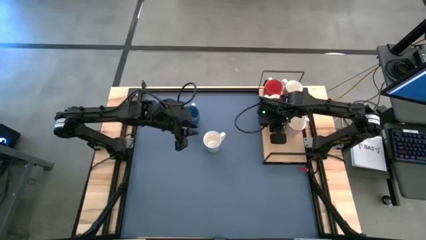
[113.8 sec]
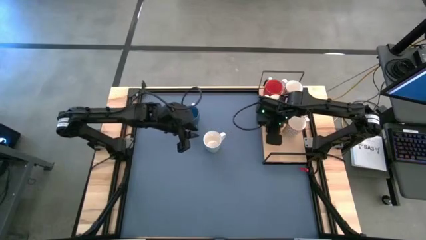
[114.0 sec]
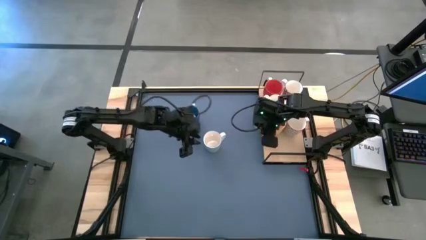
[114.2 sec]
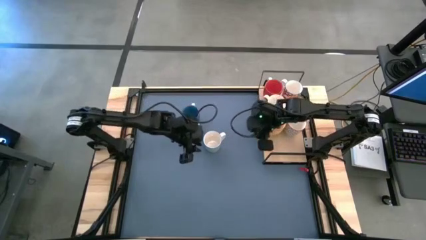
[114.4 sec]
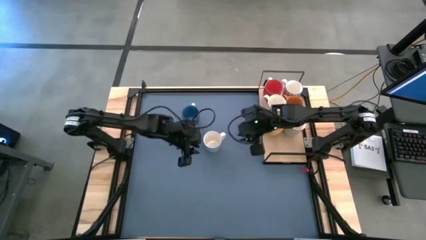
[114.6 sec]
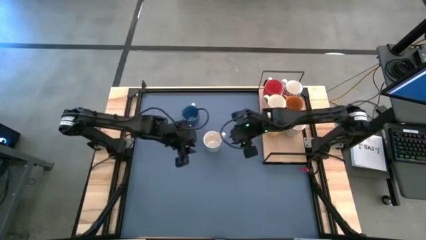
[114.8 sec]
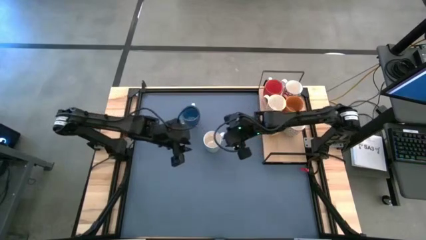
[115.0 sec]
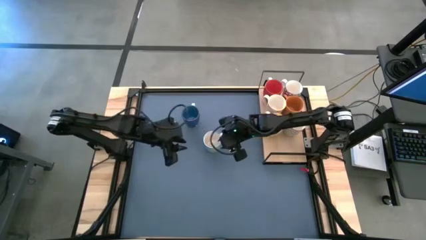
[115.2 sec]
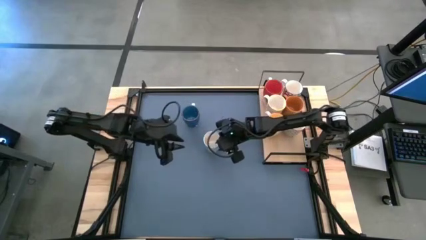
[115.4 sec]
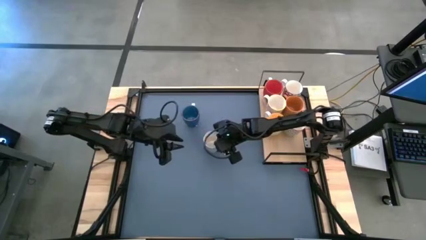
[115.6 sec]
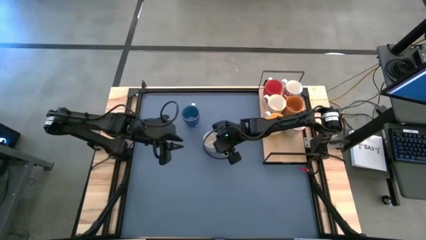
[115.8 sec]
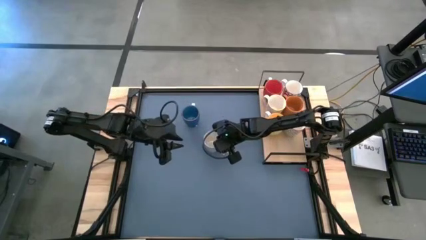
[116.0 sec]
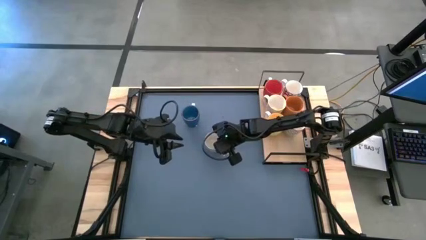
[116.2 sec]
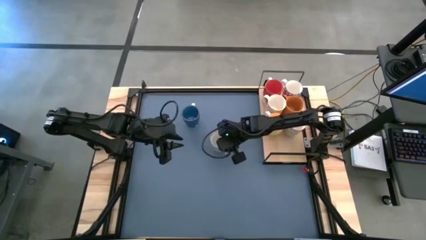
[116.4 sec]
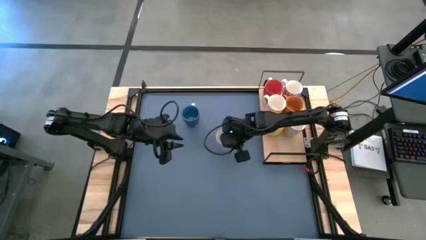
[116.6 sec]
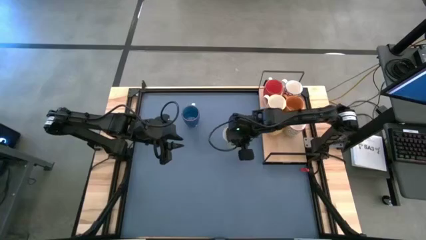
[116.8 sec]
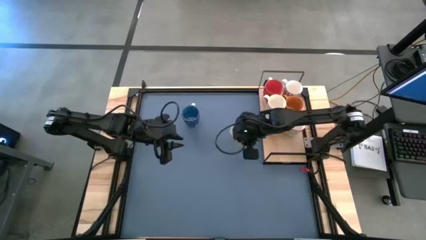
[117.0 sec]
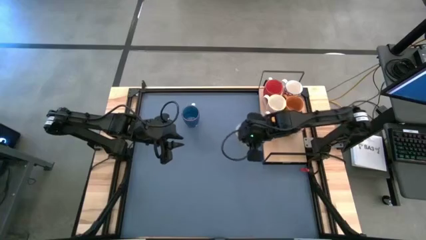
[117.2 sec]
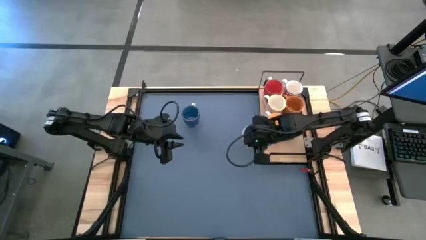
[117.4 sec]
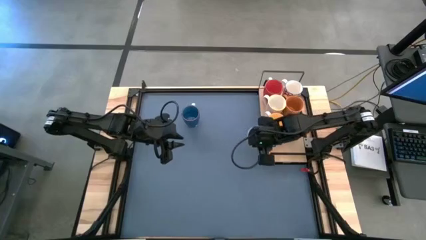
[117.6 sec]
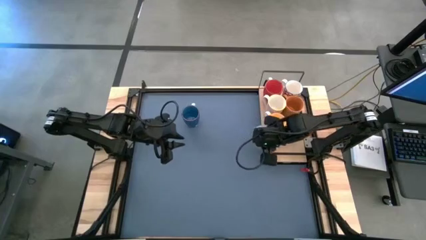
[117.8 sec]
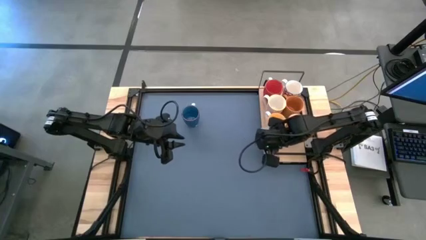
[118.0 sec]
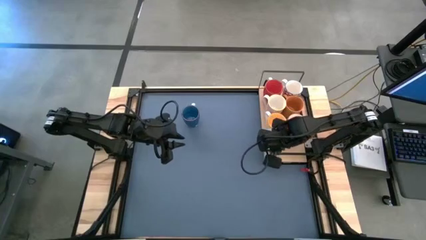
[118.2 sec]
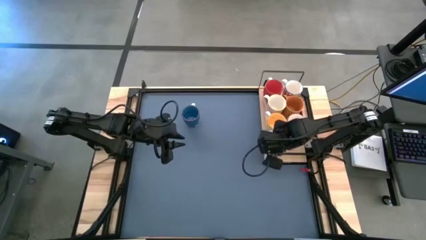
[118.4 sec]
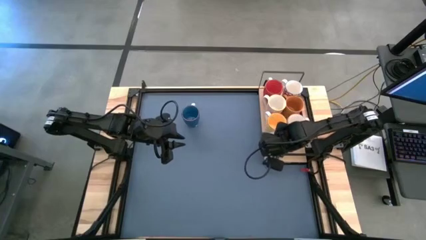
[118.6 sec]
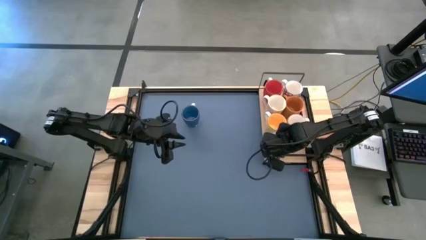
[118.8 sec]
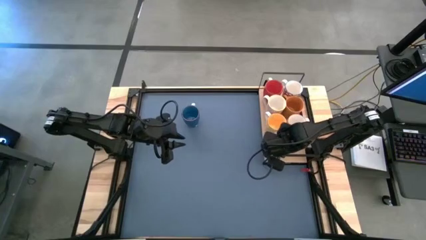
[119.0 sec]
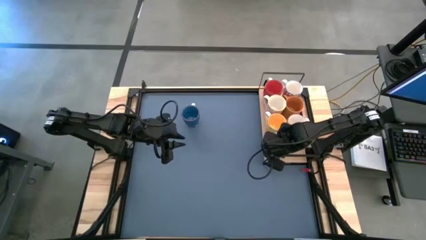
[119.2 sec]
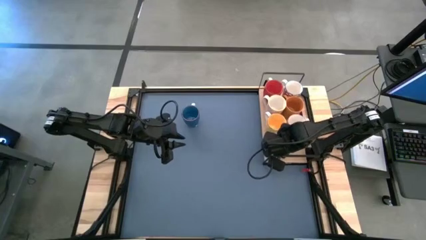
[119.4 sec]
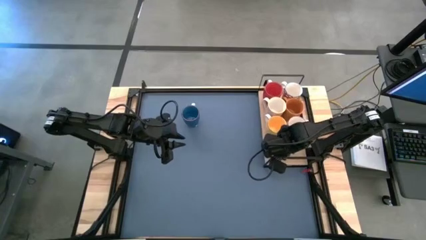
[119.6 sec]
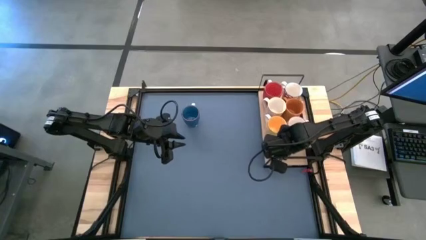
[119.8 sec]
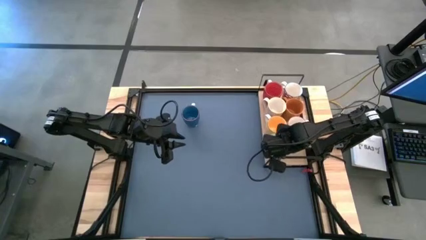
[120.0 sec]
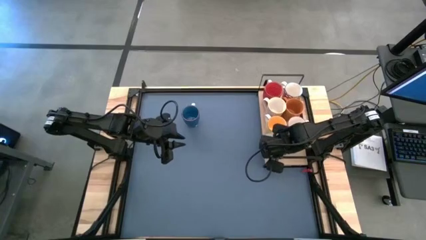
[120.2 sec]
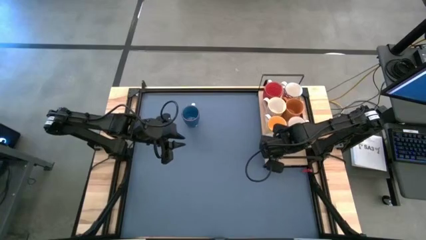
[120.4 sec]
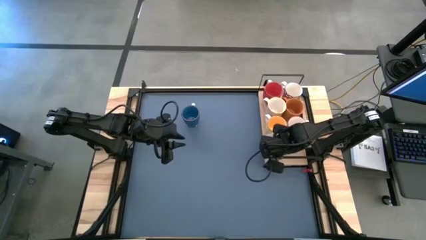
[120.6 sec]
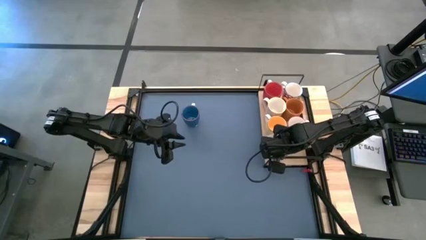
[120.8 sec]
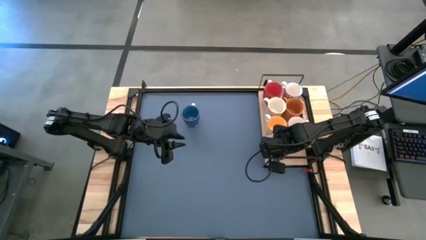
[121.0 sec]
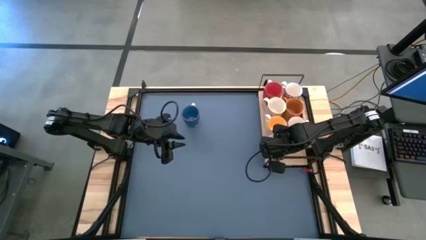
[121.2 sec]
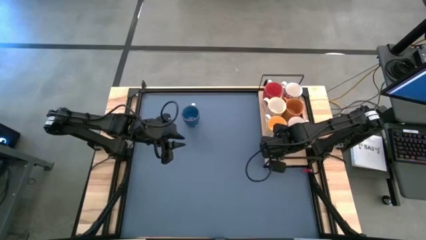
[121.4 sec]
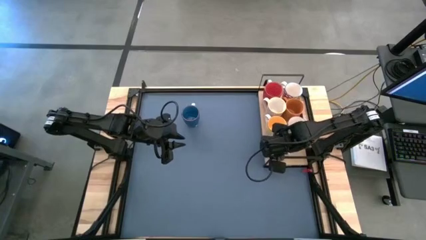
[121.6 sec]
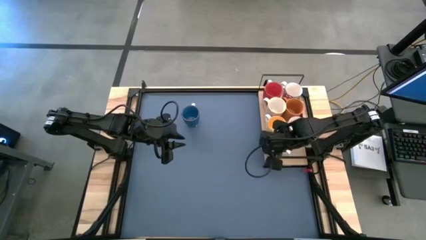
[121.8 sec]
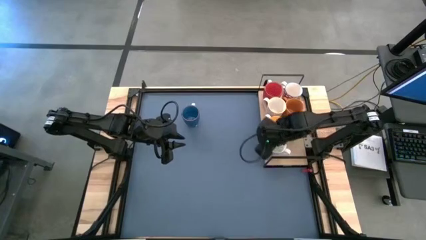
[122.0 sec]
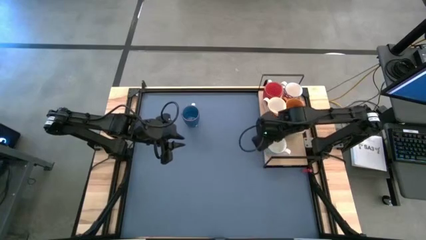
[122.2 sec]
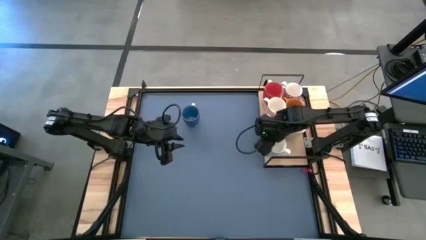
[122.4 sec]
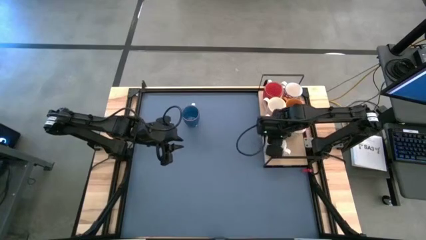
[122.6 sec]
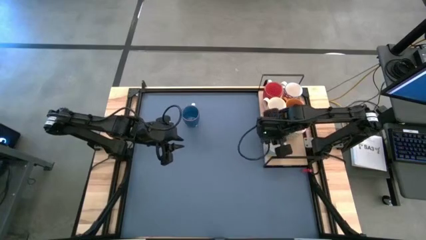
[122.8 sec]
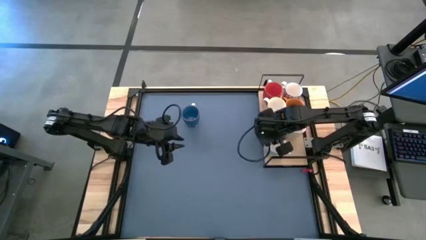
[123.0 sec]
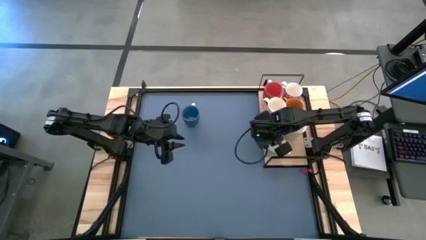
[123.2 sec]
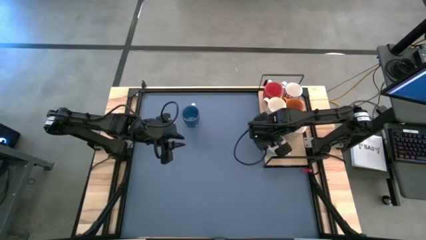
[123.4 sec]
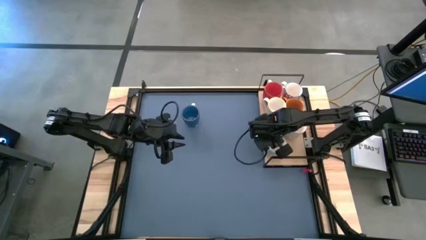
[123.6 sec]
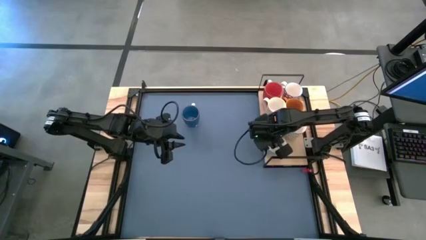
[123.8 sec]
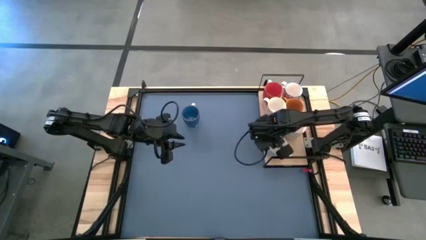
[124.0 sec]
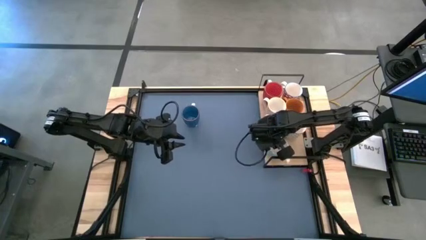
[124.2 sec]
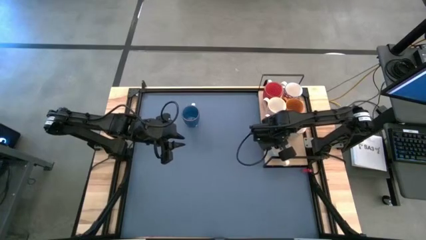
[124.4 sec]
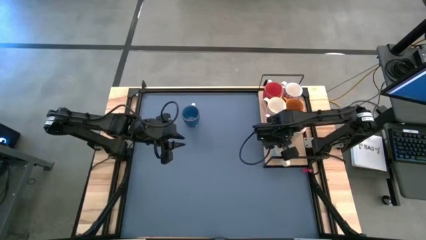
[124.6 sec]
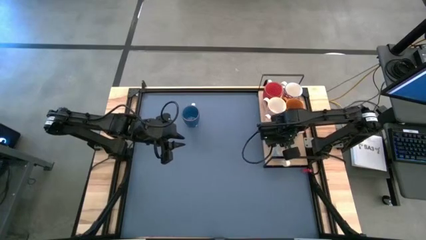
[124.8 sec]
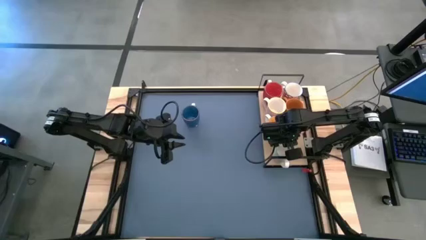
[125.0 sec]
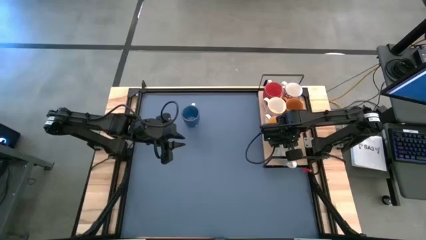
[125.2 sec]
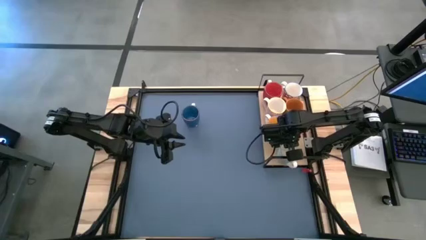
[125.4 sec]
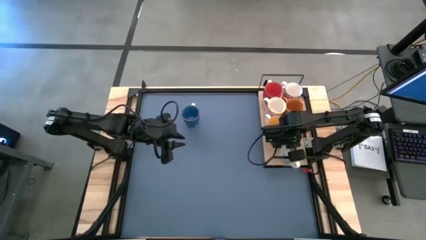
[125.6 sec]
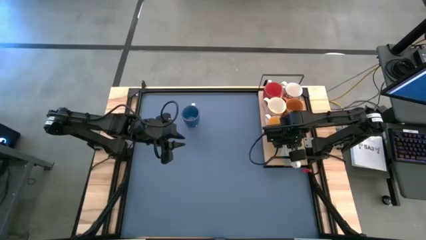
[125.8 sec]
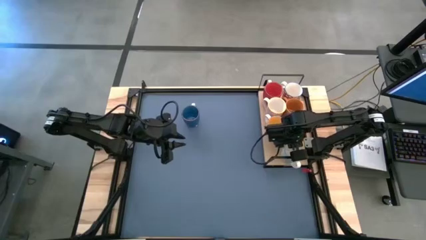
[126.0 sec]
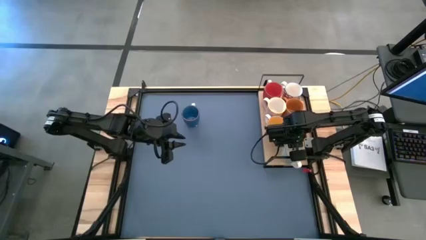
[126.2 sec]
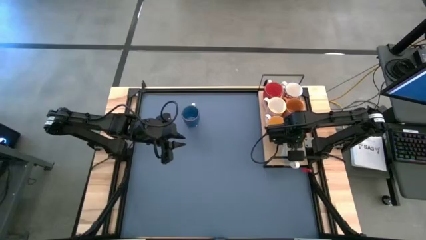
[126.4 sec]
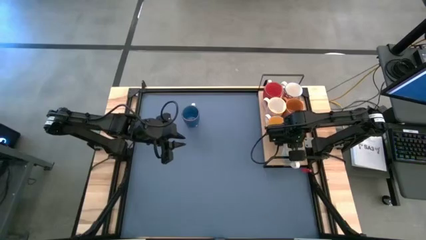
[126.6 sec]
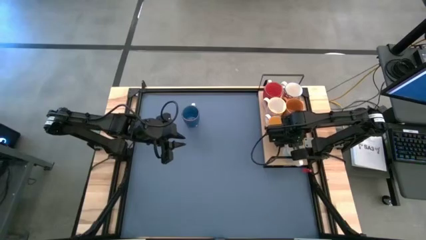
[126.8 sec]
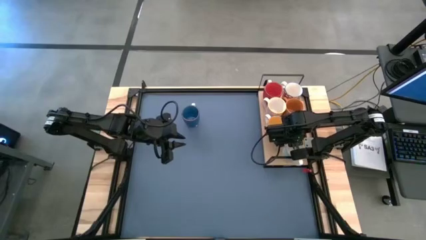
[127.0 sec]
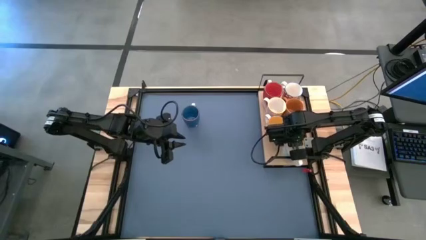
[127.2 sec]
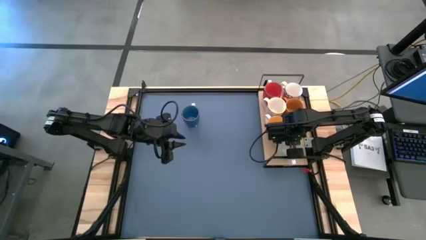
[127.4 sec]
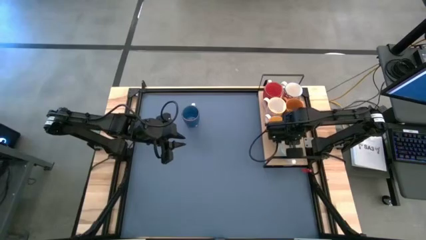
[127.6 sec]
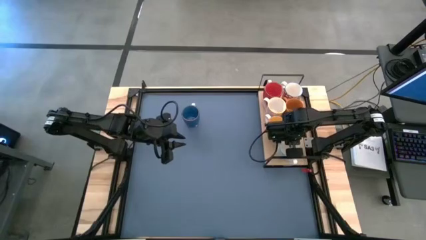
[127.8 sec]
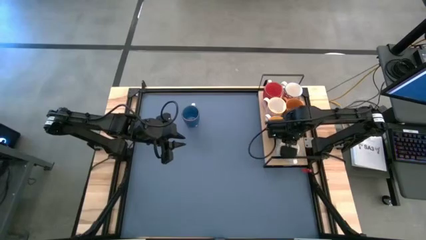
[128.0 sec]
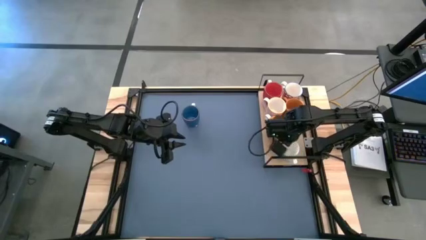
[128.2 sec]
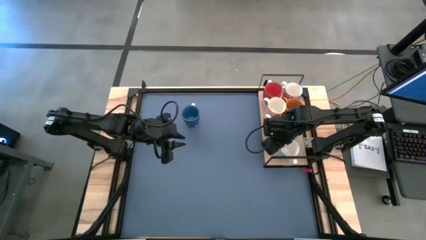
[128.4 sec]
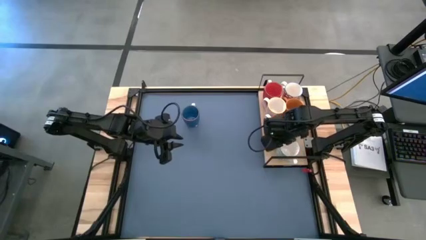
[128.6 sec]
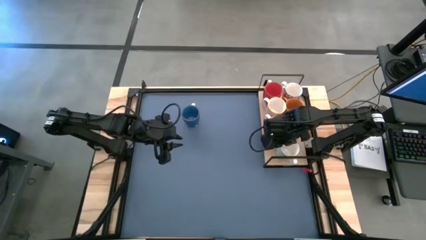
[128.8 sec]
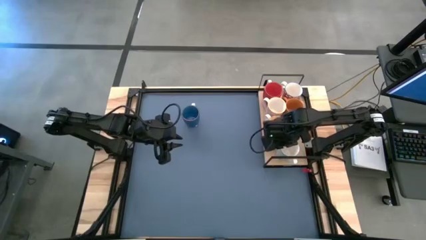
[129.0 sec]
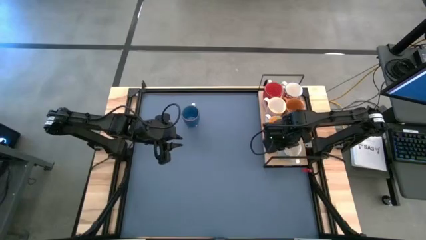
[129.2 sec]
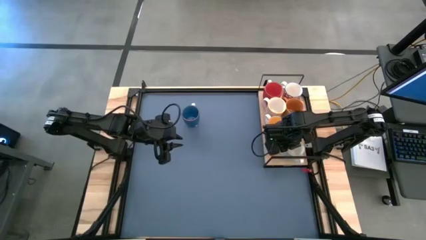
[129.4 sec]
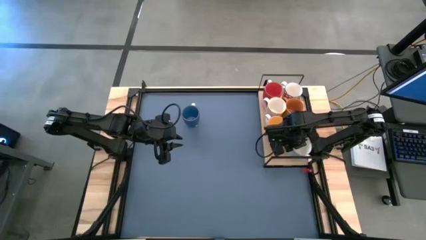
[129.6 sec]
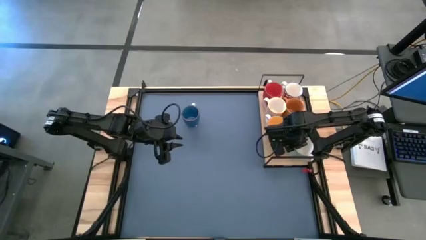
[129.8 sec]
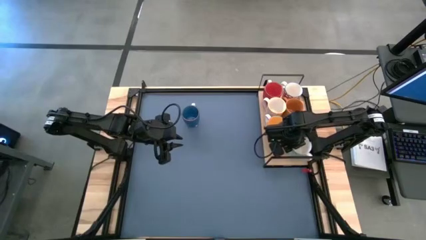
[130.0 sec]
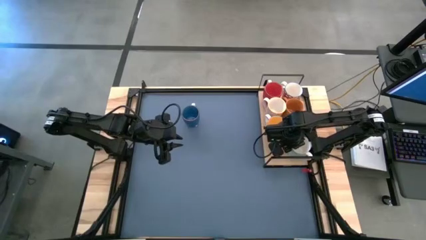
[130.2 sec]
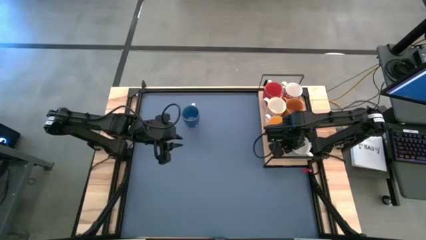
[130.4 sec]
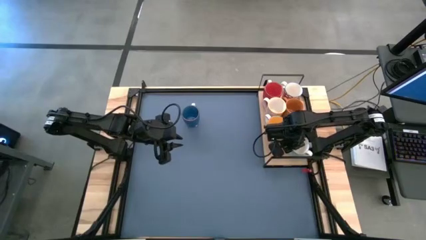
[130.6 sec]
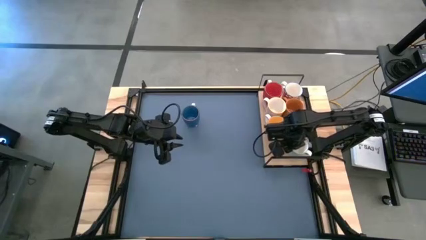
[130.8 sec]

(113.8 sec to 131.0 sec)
Task: Place coffee mugs
Put the gray patterned mug on the shelf
